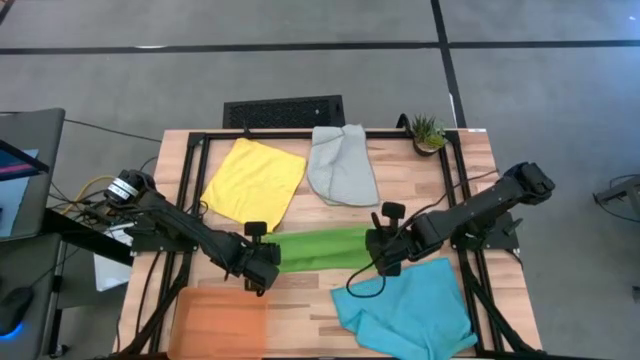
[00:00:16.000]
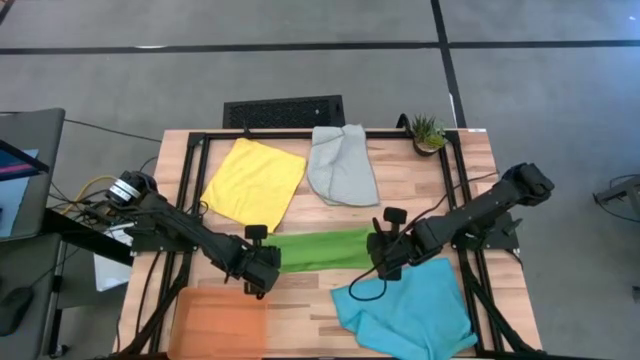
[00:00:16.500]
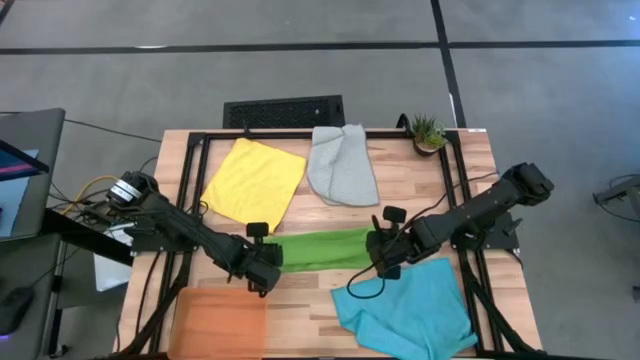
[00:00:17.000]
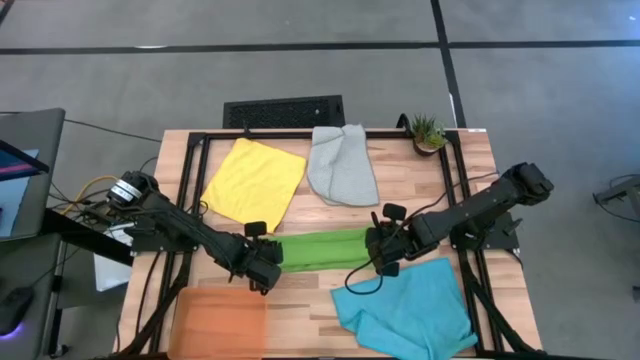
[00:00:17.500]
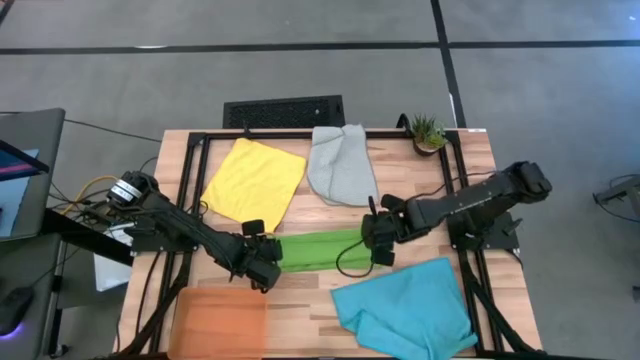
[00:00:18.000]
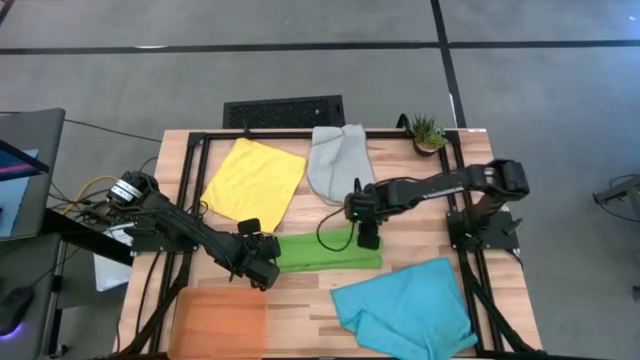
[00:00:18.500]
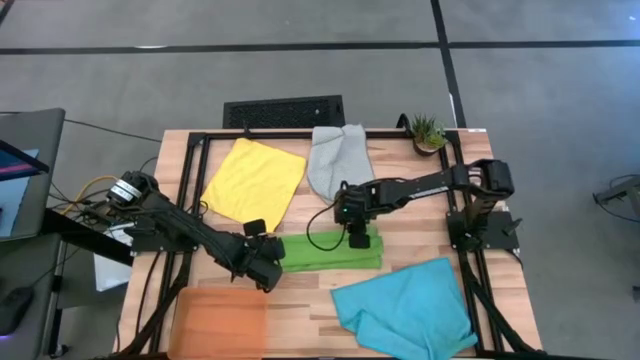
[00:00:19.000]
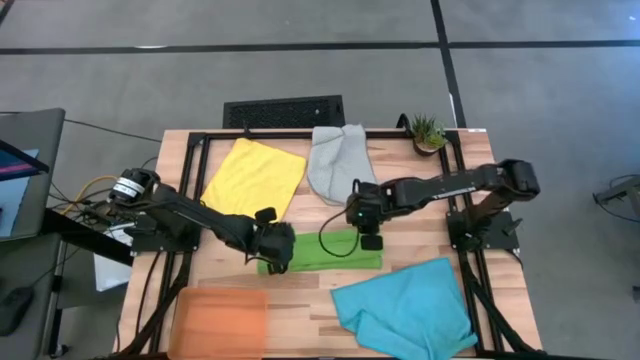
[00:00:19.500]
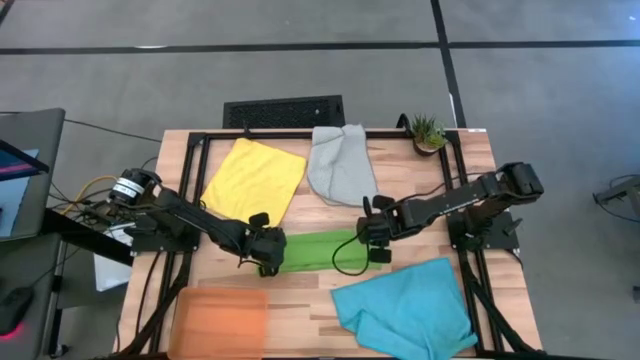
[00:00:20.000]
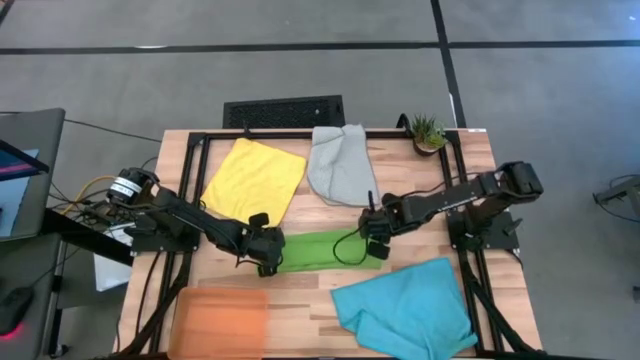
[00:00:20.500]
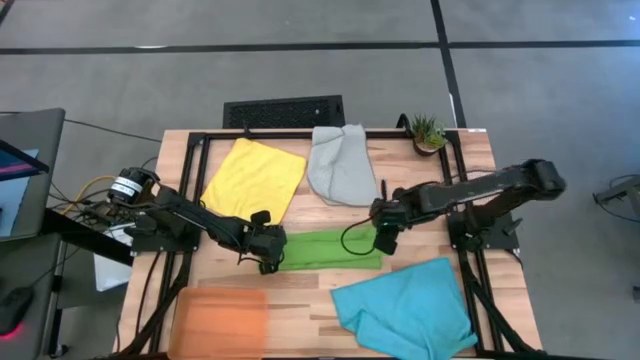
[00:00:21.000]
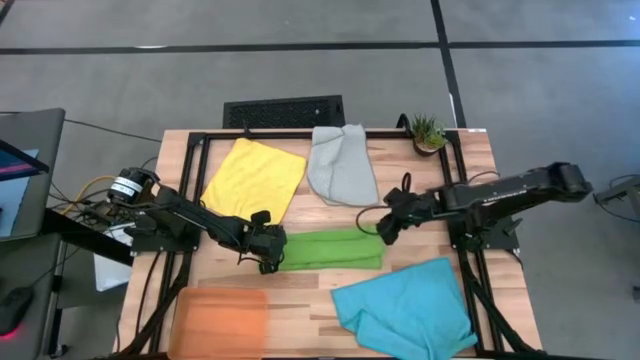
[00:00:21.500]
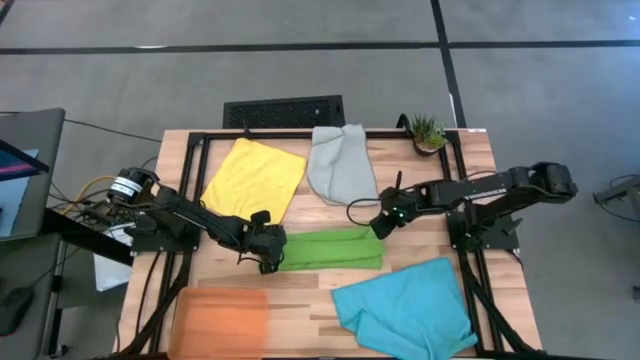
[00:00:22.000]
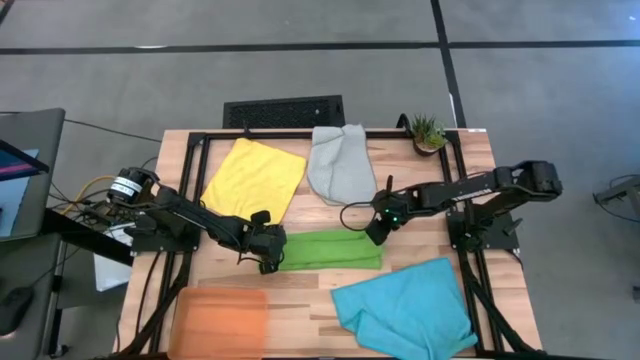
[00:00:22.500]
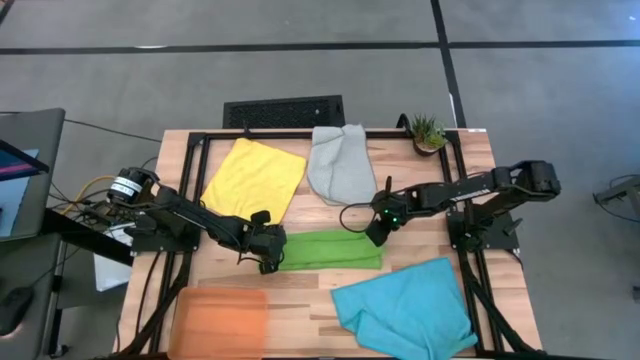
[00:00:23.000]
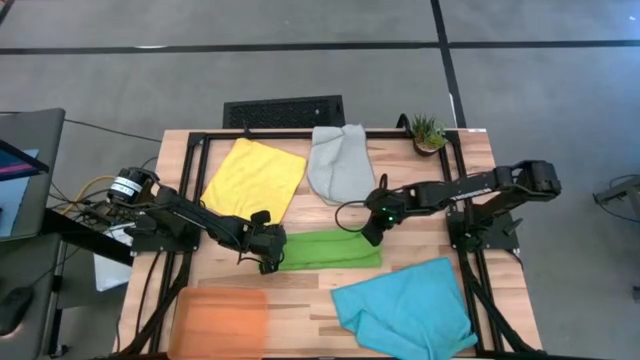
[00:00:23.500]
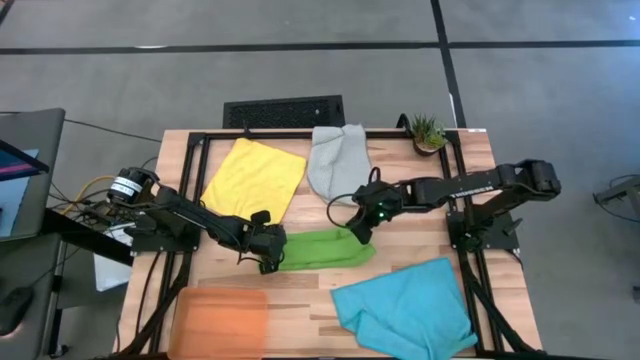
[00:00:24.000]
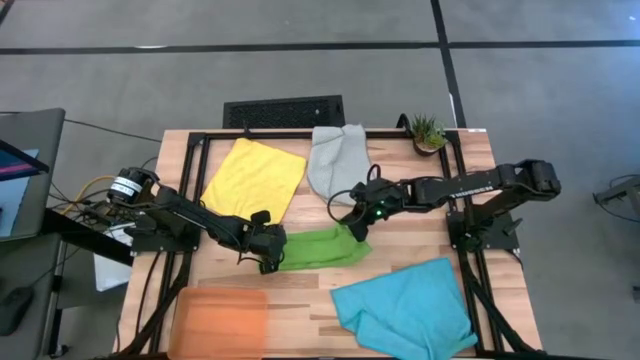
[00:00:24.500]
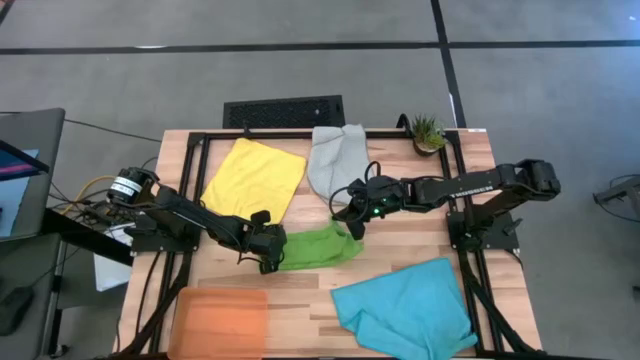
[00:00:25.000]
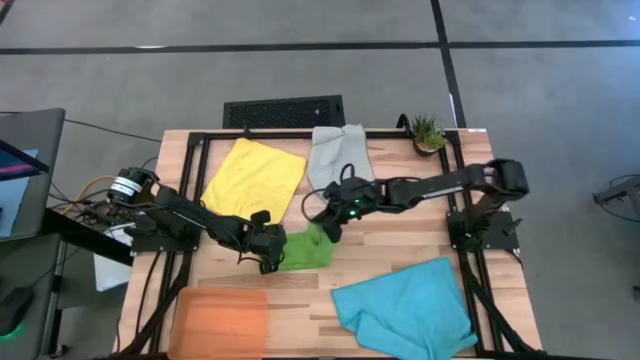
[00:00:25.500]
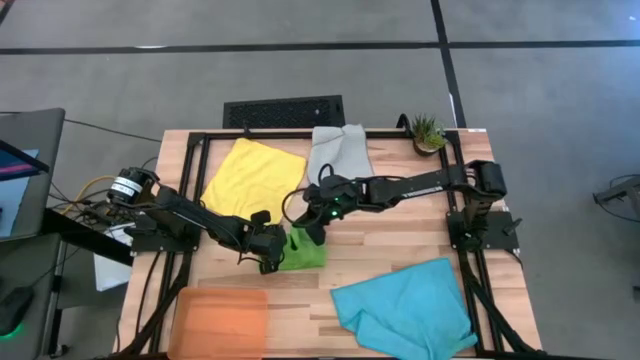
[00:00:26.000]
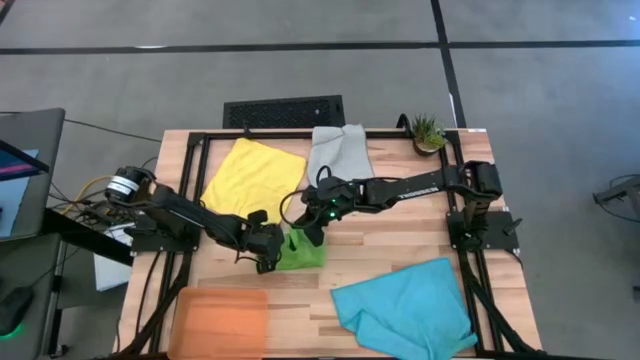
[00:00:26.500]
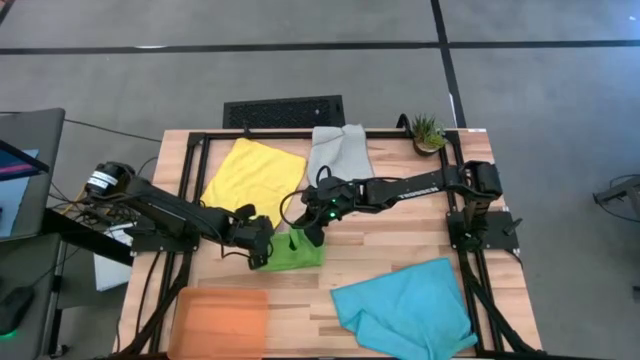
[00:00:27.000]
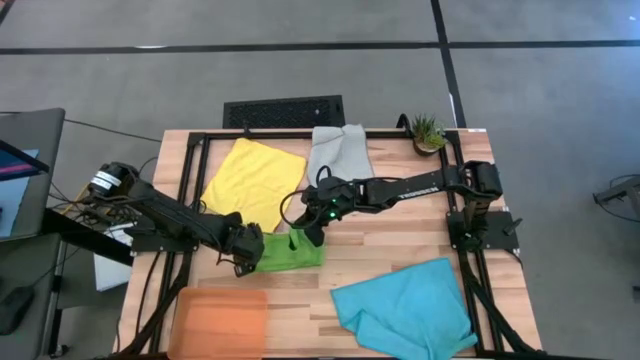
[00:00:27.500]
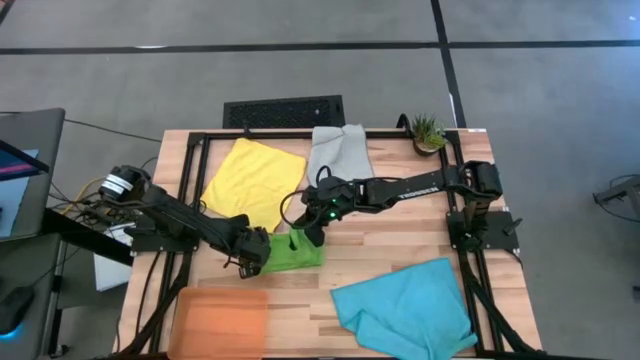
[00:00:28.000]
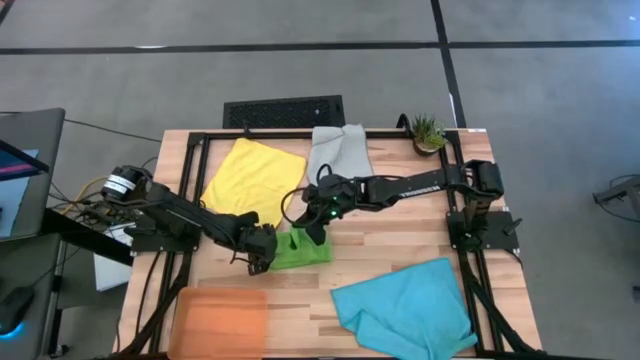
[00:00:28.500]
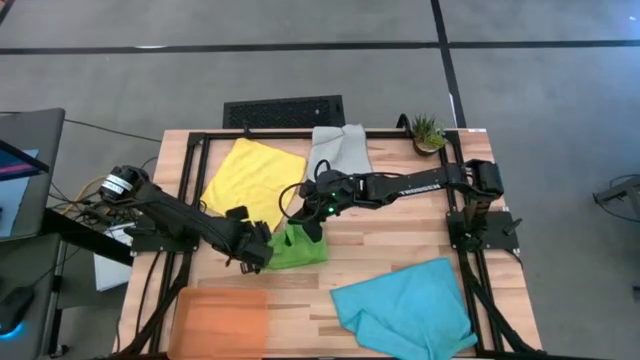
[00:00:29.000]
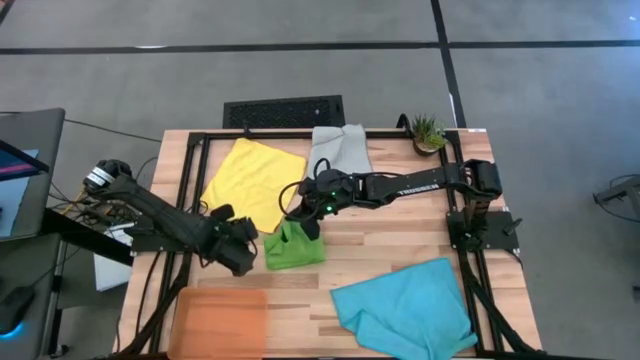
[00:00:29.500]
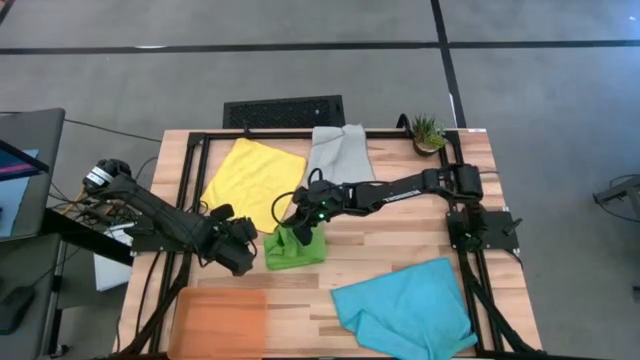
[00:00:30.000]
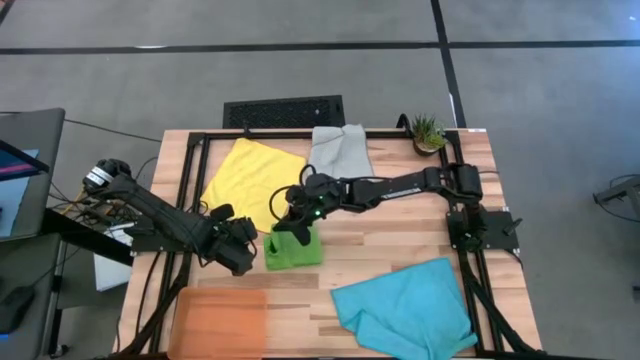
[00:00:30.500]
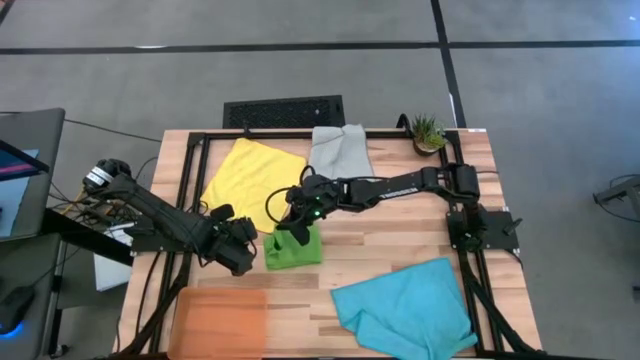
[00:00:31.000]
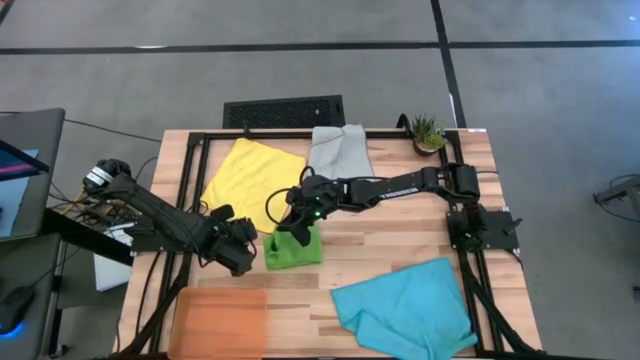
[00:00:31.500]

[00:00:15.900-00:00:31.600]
Task: Fold microfiber towels
Fold the green towel
